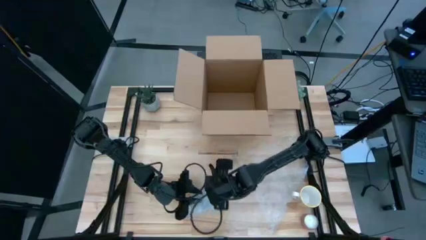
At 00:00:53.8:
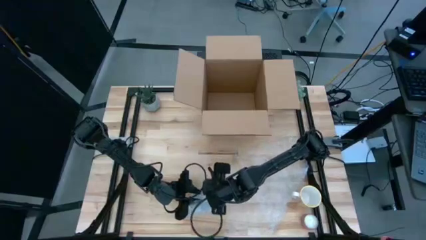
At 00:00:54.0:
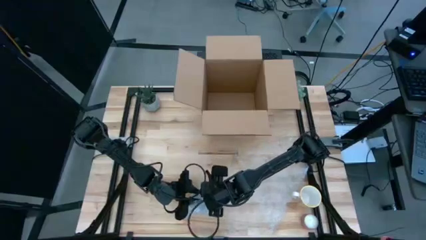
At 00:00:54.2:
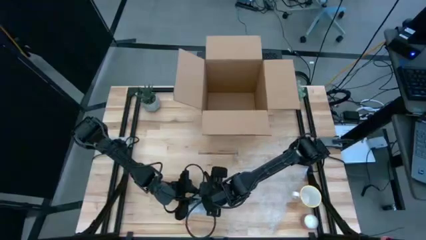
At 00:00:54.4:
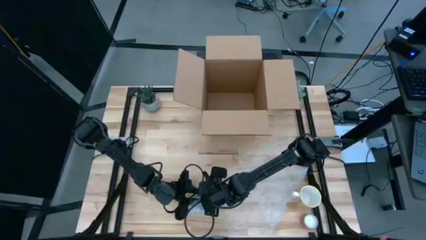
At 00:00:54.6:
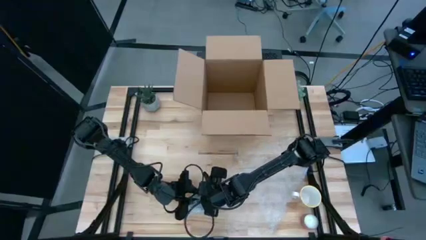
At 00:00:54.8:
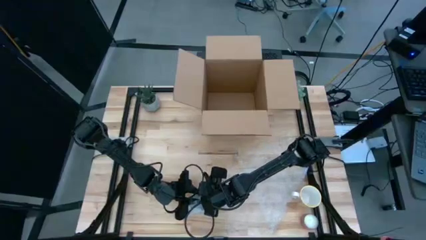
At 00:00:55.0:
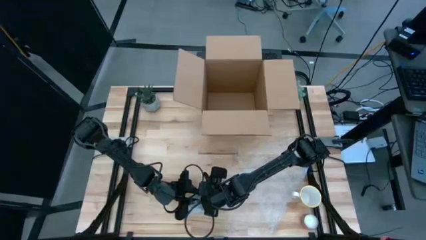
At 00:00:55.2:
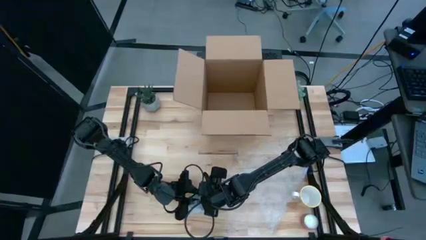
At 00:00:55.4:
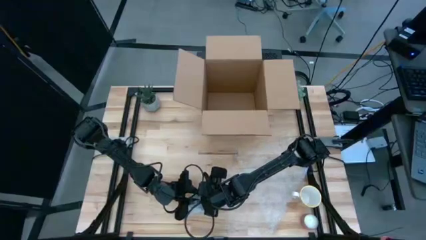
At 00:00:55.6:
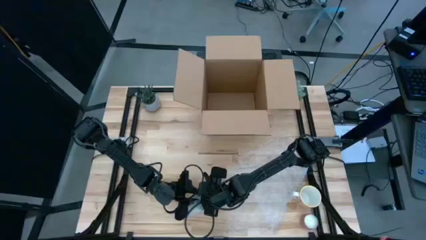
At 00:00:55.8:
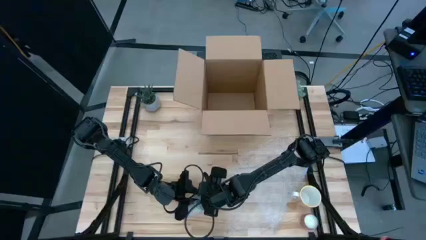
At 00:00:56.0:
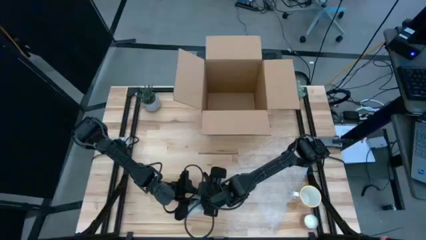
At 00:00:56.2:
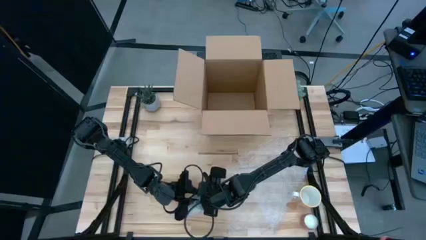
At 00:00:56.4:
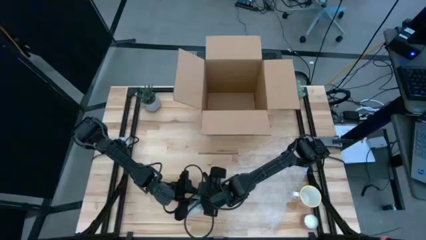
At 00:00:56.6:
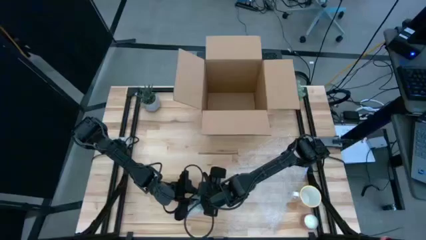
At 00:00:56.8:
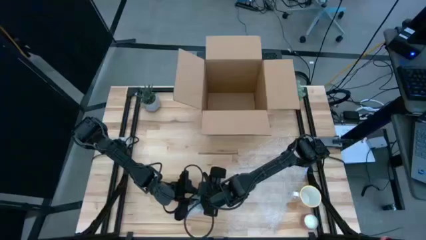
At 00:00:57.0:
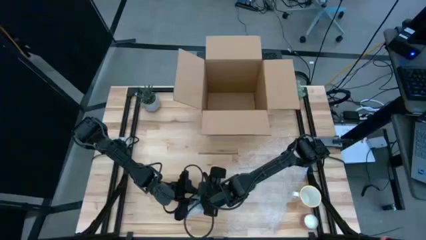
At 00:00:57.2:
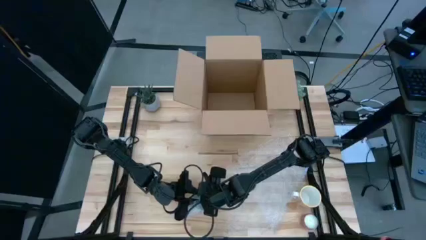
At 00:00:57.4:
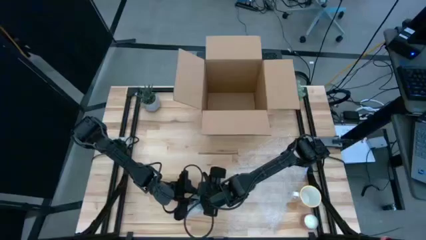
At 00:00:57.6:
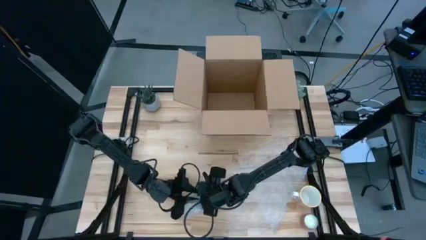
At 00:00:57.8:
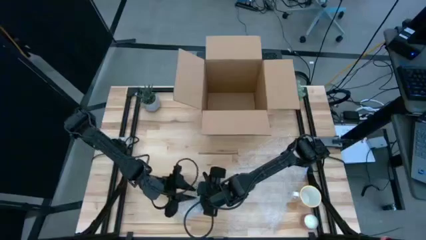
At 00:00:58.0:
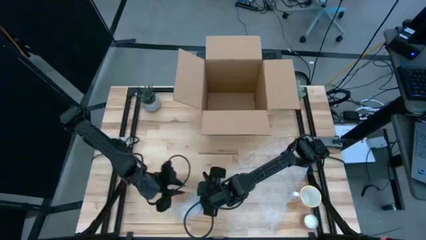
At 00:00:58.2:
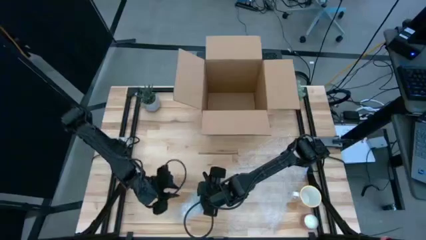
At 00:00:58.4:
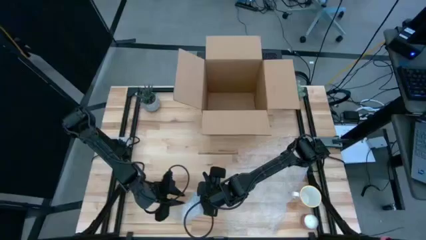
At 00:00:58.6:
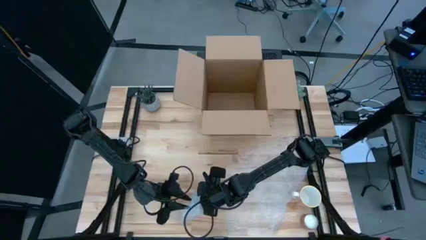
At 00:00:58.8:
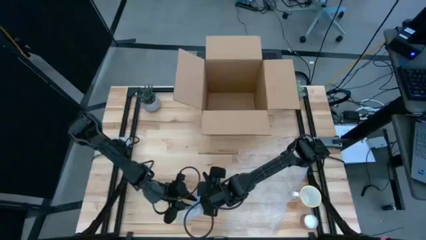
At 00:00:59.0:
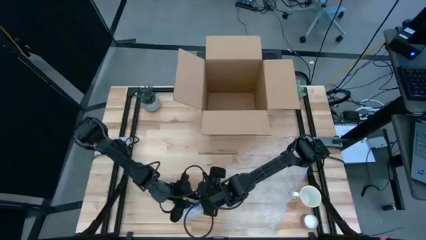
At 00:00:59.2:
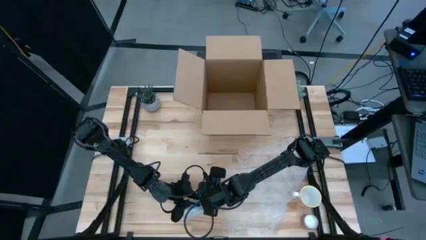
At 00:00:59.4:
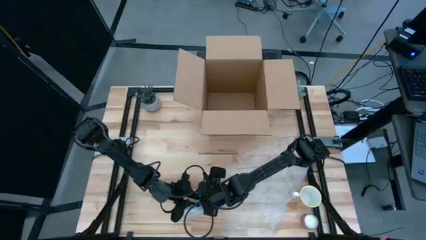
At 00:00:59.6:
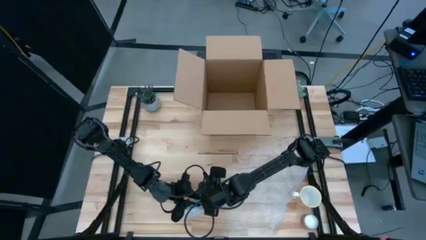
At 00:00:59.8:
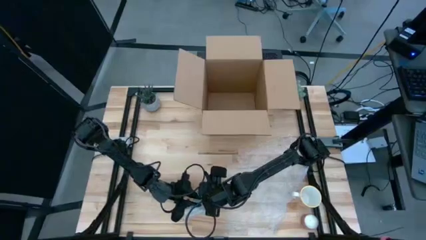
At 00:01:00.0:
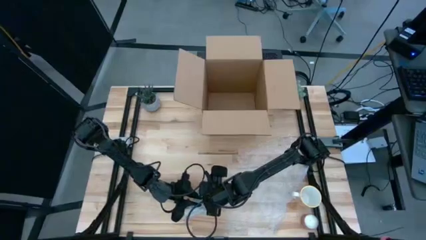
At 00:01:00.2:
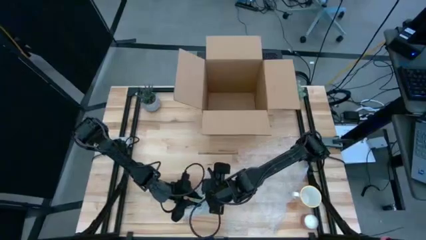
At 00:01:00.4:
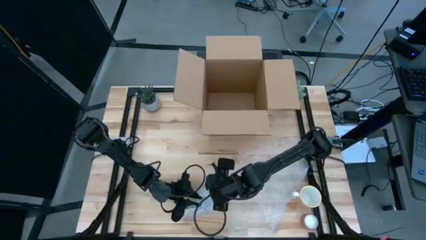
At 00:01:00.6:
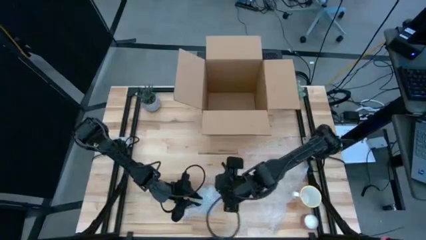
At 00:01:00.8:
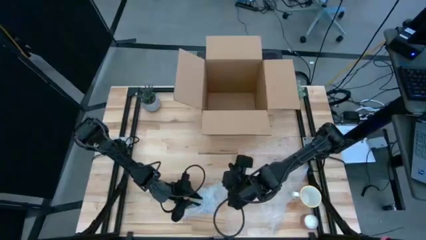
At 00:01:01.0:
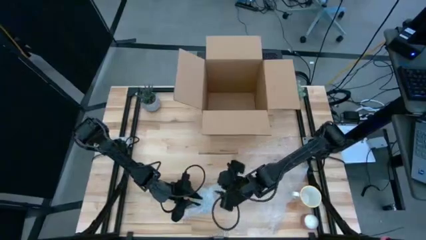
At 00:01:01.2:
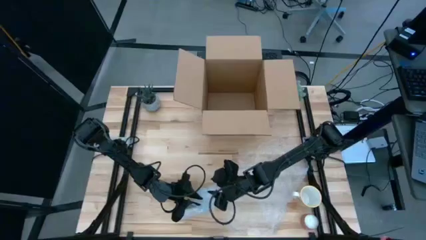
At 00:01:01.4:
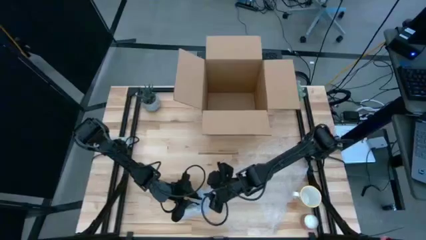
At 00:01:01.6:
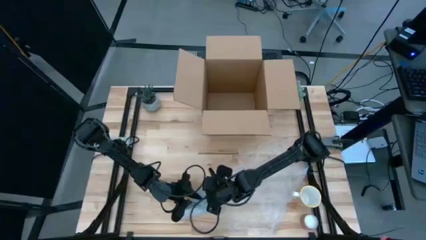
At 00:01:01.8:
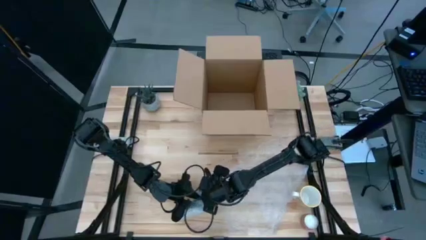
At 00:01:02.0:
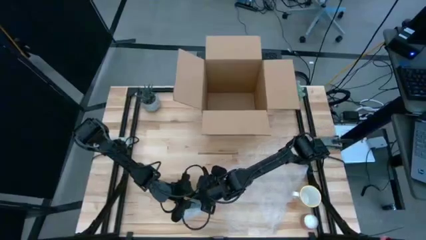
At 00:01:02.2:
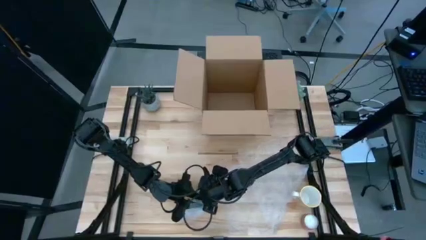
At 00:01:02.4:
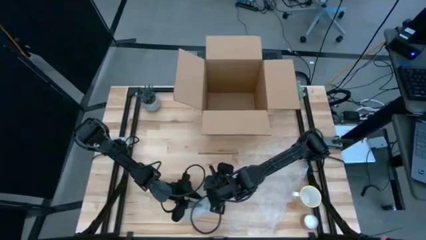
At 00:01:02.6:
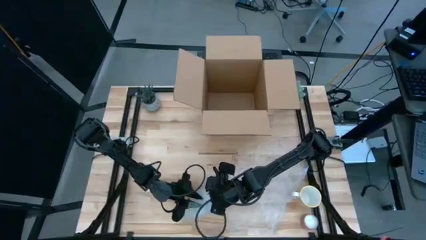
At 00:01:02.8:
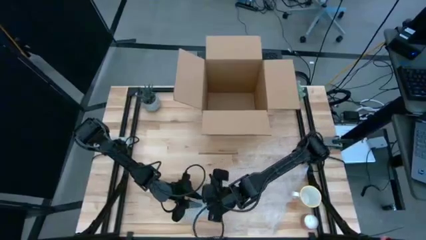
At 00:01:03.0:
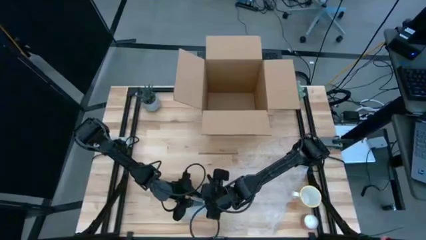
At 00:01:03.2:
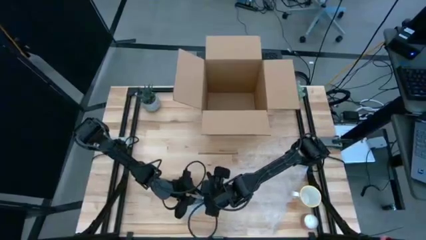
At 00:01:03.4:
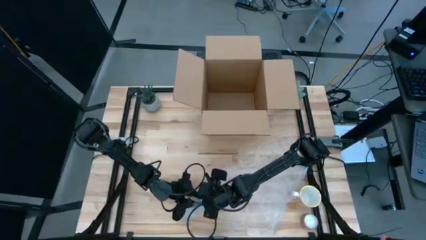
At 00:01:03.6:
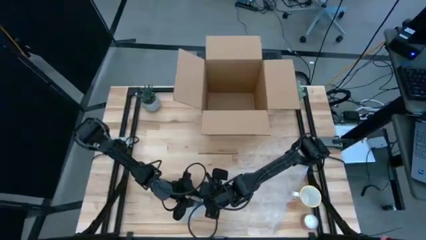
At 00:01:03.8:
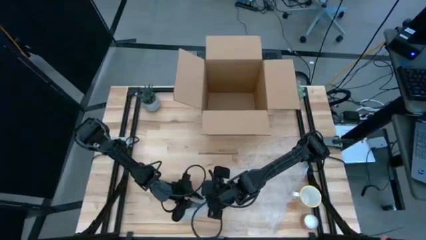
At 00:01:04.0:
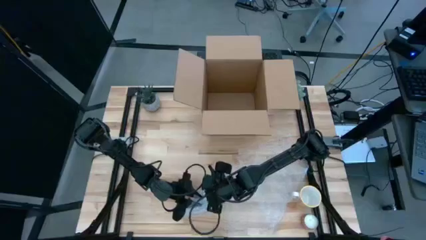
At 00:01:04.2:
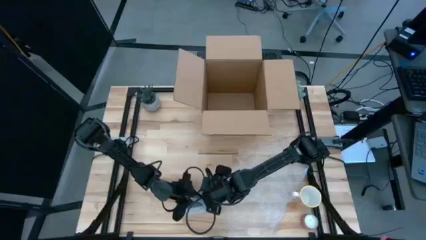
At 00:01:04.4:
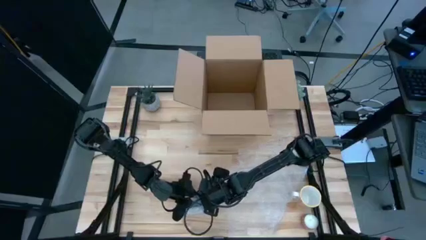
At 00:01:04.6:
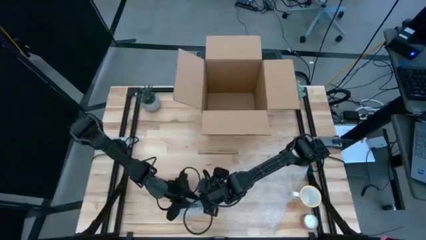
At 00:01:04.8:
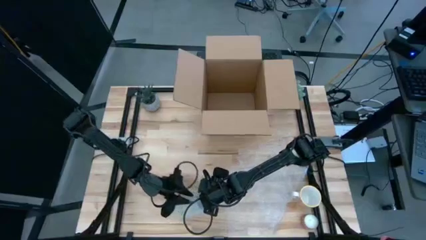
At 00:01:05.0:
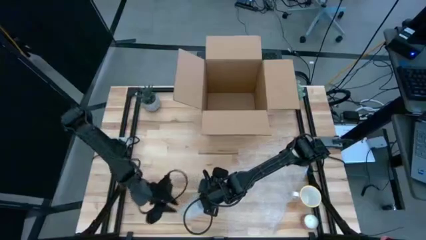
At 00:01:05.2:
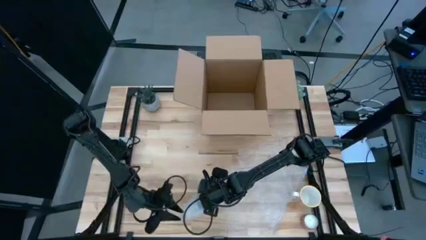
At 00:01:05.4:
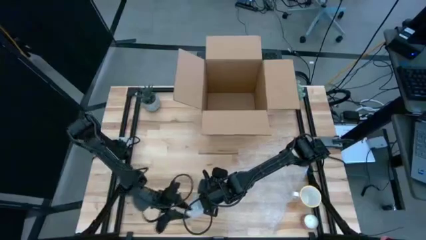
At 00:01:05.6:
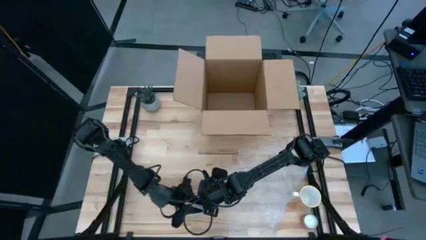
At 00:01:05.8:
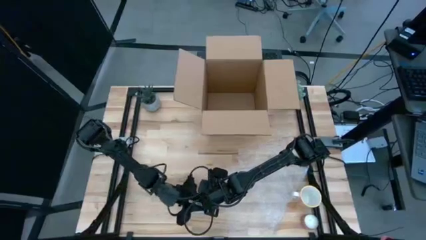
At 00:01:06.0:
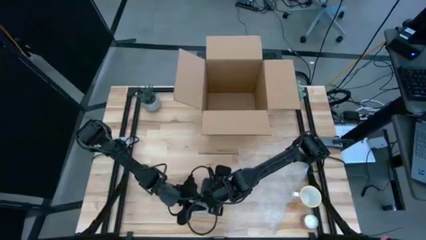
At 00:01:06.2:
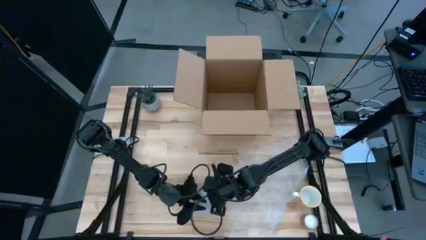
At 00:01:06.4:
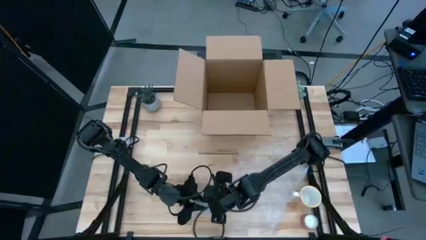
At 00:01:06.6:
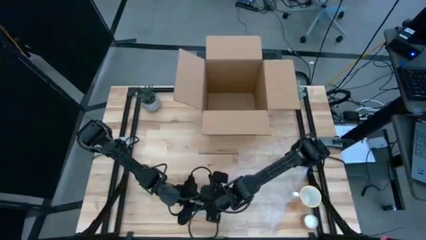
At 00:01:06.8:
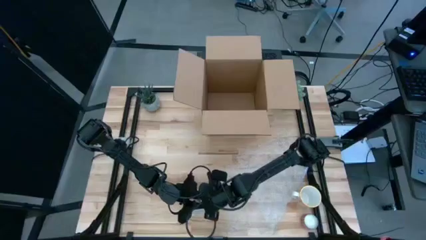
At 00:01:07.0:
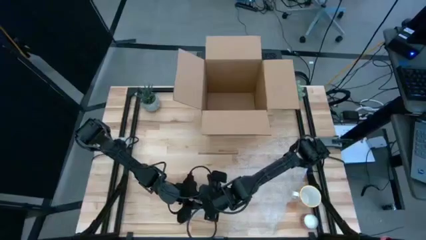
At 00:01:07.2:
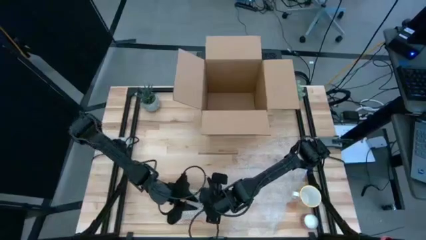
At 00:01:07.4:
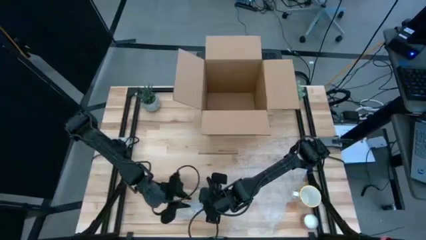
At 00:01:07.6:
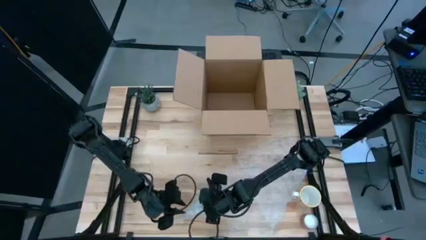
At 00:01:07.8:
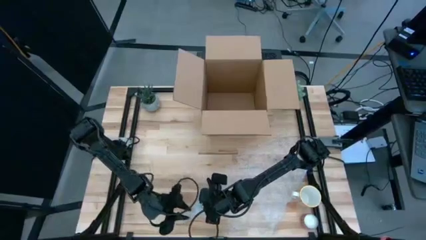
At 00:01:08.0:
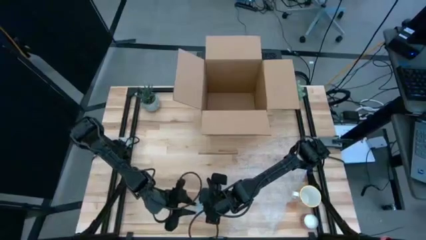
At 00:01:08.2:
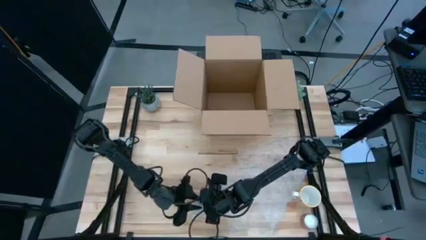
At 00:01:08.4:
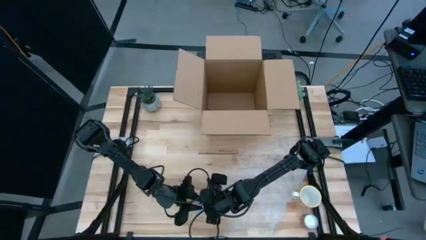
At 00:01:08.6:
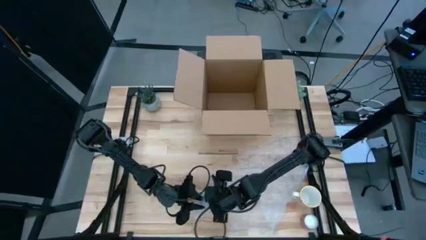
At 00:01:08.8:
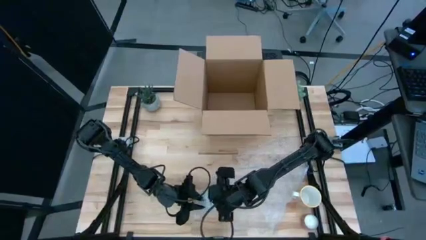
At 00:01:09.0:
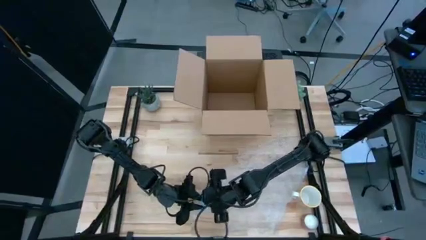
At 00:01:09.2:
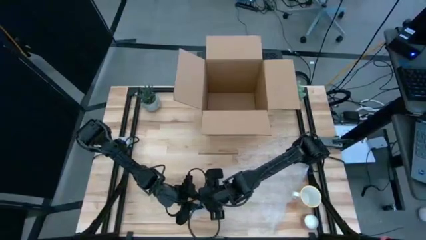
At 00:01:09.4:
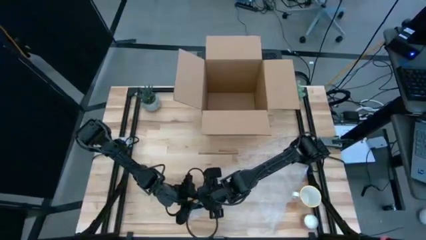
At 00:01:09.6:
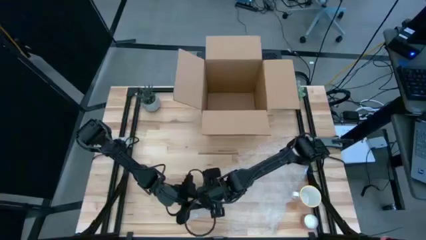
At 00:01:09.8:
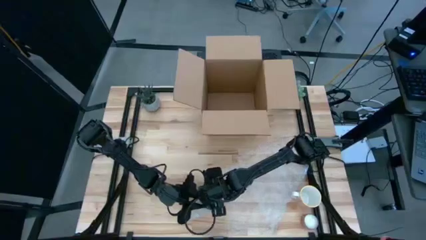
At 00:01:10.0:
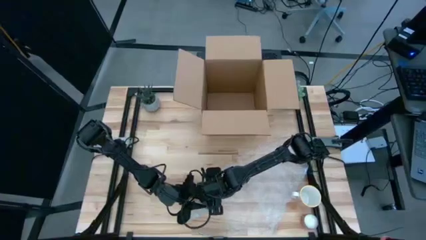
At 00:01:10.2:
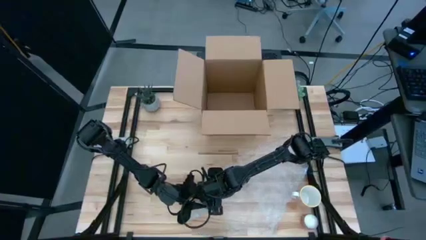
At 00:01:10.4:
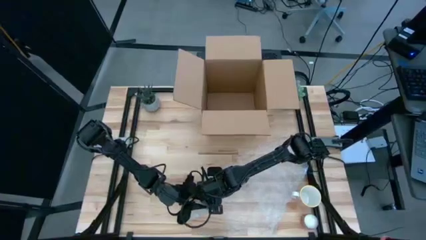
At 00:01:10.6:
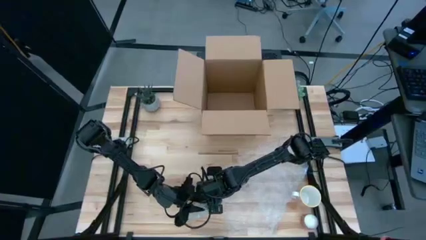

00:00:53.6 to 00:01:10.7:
Task: wrap mug
Wrap the red patterned mug with the left transparent bubble wrap
